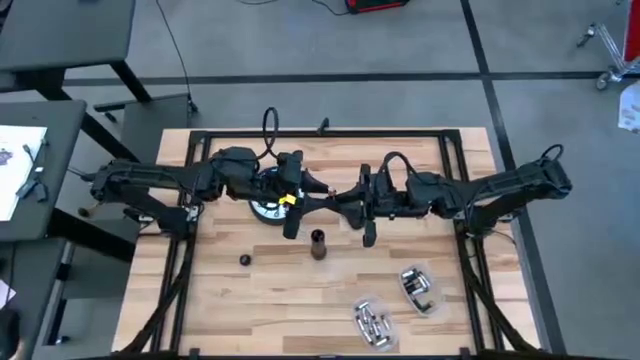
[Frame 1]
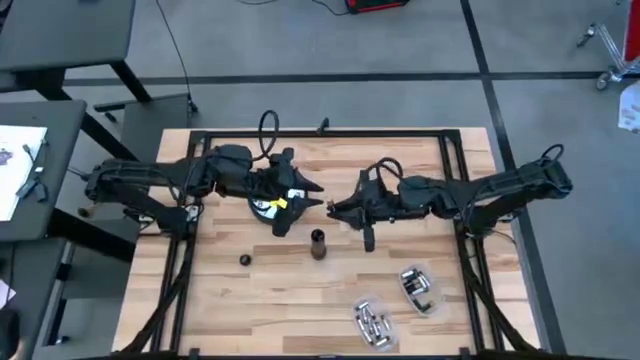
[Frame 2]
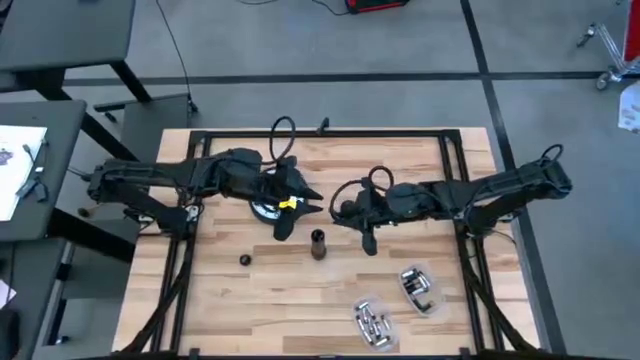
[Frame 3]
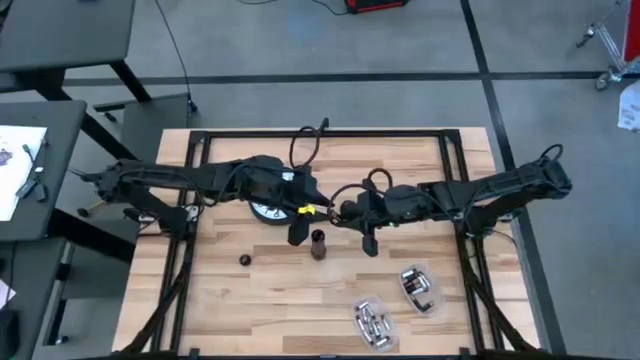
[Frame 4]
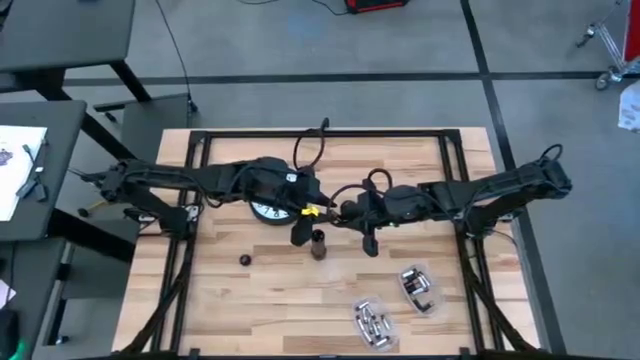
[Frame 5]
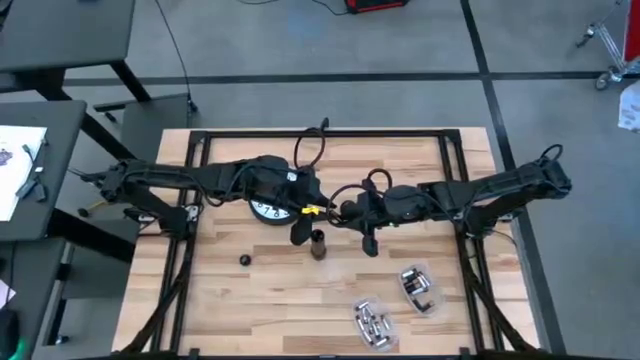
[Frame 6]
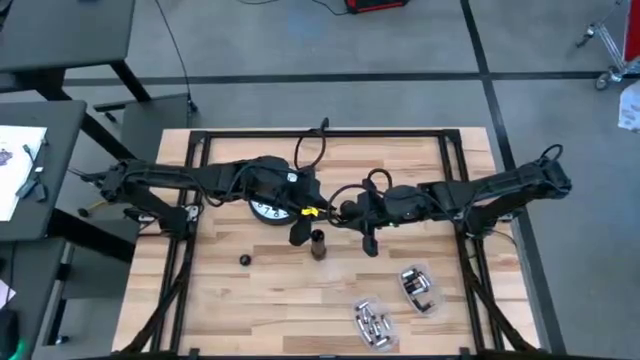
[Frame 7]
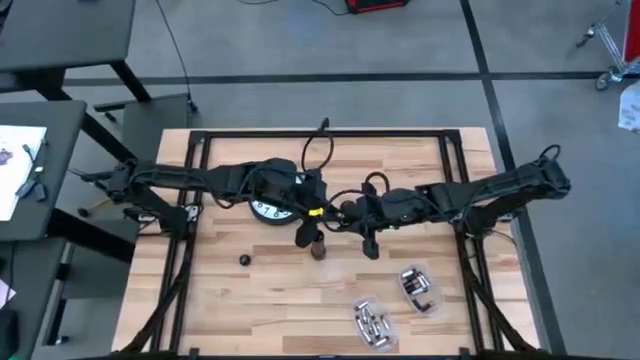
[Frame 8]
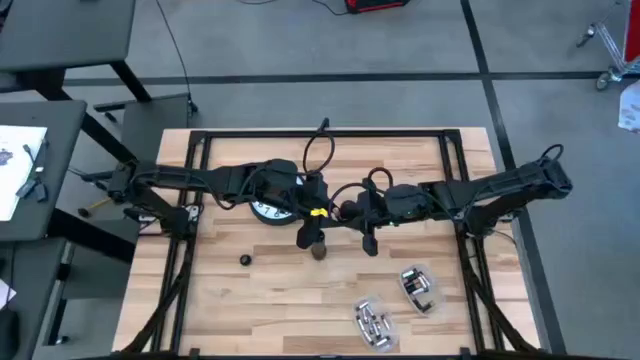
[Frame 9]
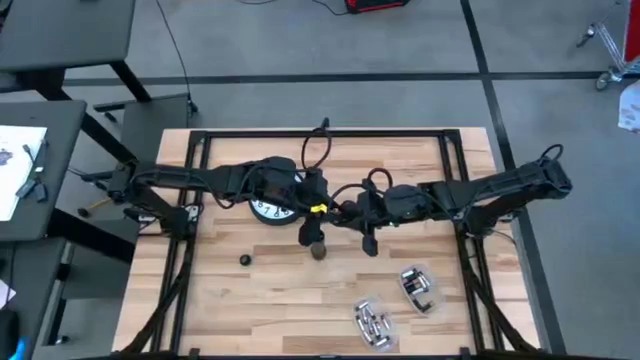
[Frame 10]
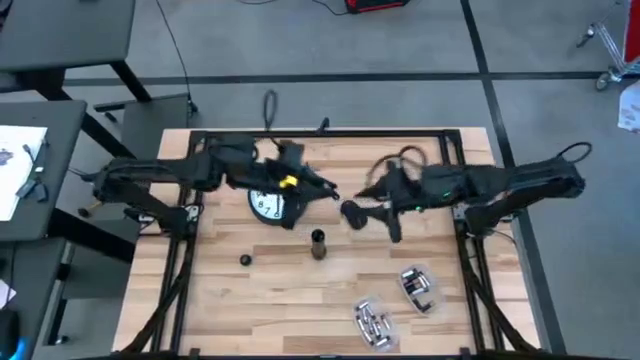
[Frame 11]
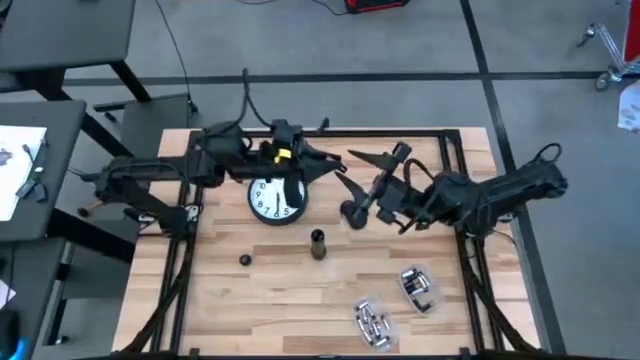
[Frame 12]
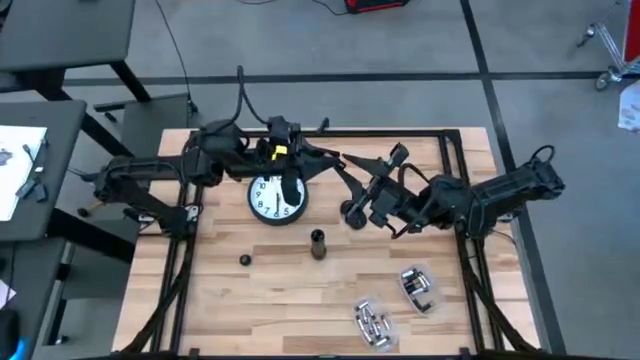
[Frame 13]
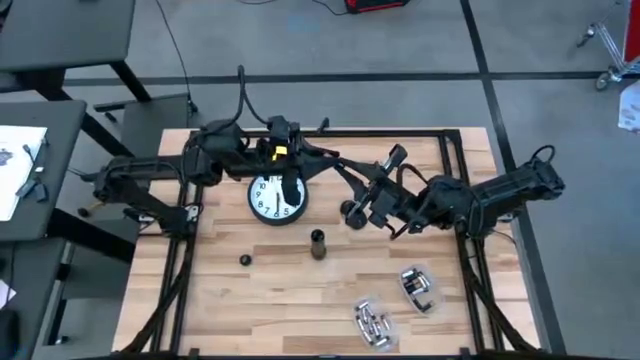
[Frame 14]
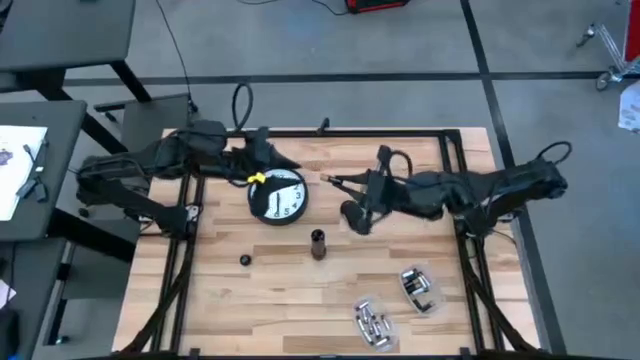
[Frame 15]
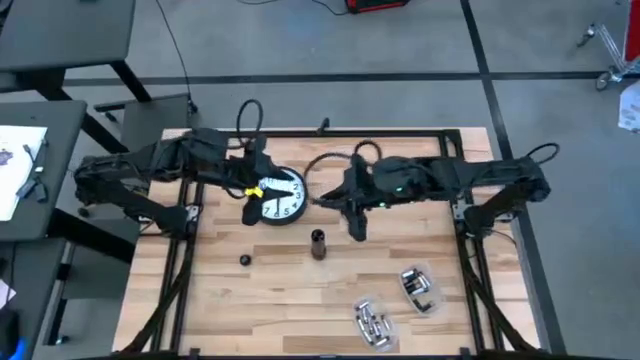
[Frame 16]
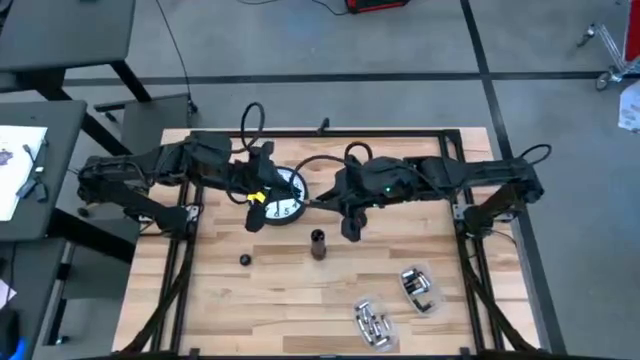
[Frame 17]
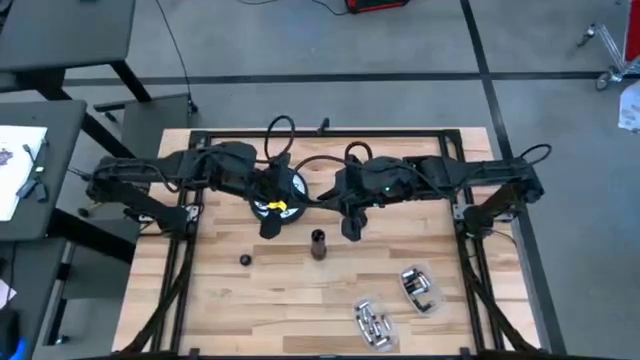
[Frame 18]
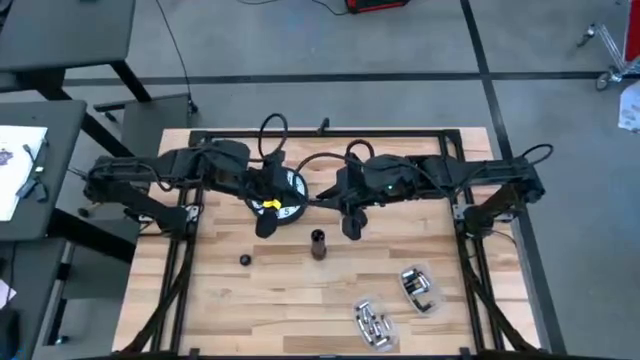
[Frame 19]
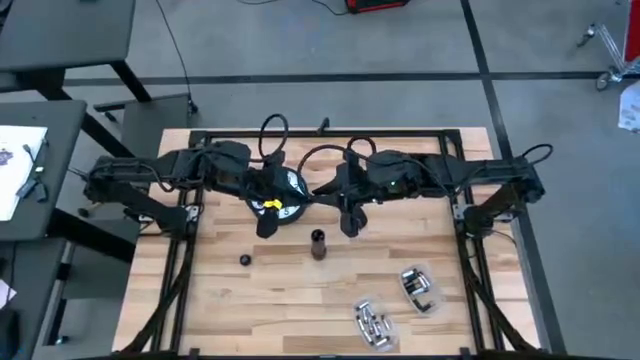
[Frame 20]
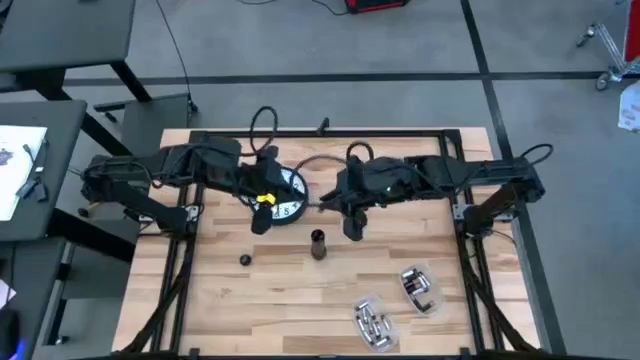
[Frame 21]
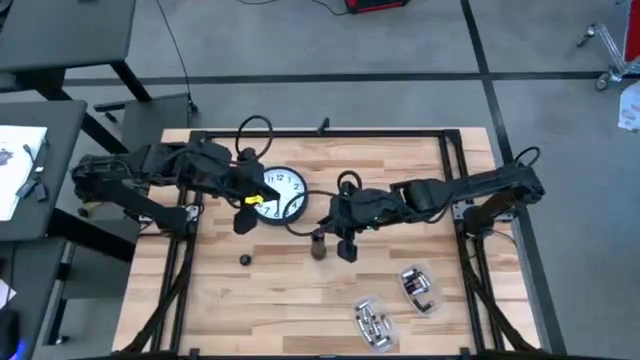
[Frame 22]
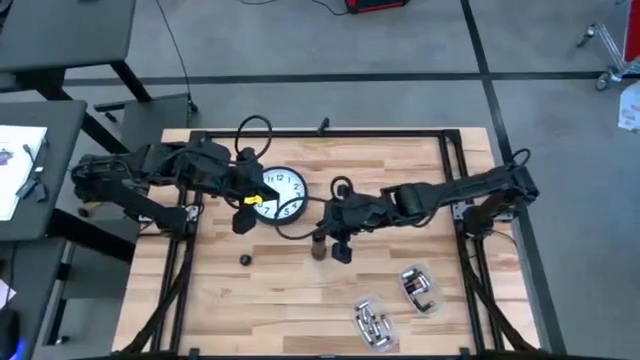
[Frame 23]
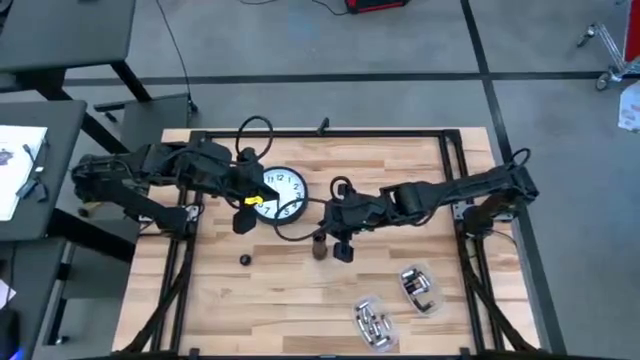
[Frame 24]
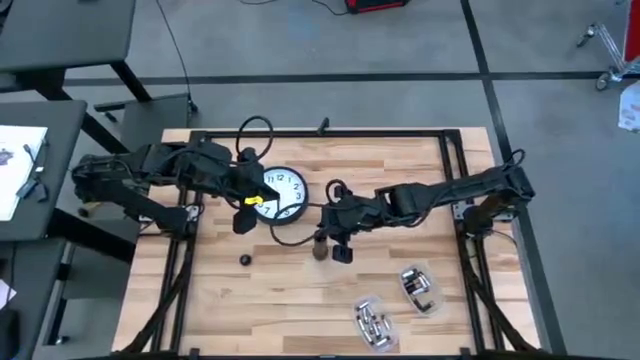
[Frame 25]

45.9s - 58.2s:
Task: Insert battery
Insert the brown battery into the black flashlight battery compartment

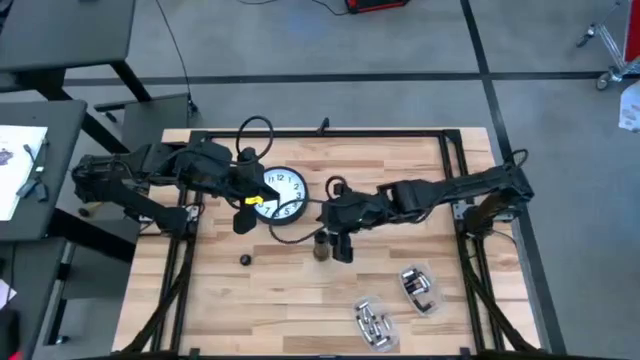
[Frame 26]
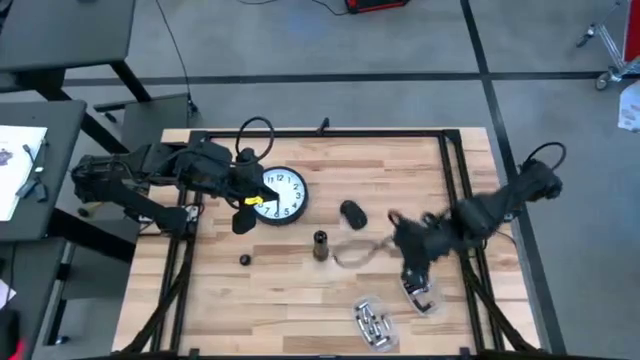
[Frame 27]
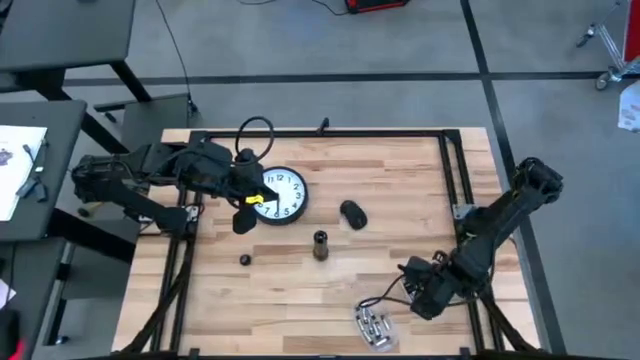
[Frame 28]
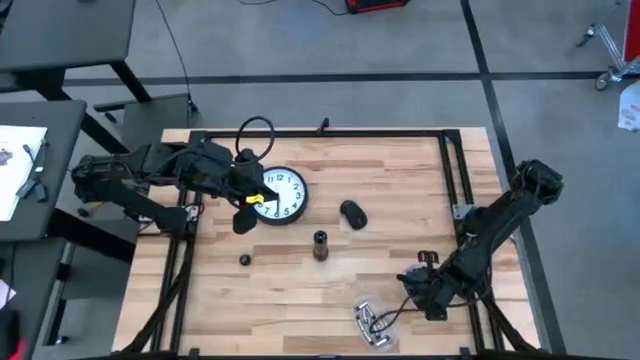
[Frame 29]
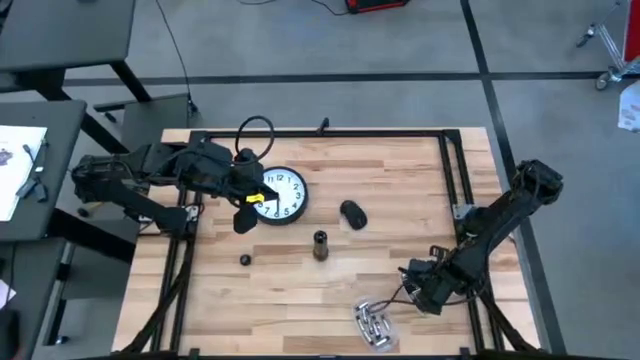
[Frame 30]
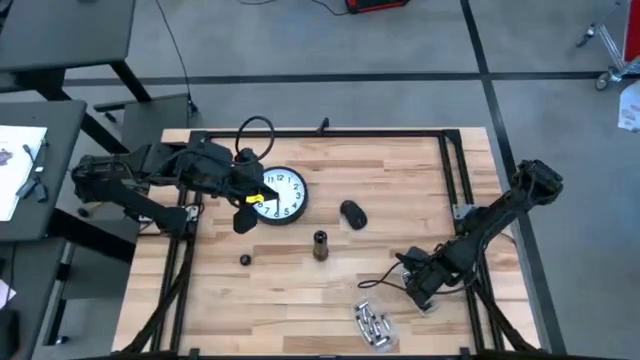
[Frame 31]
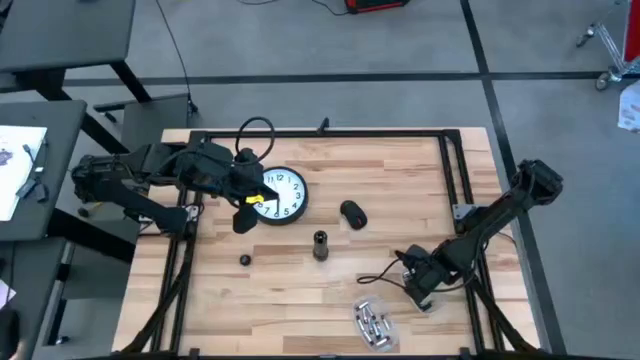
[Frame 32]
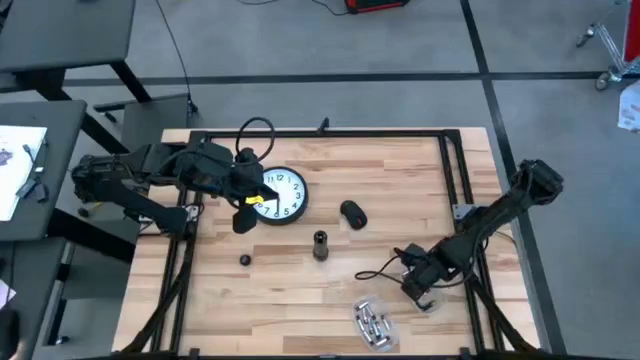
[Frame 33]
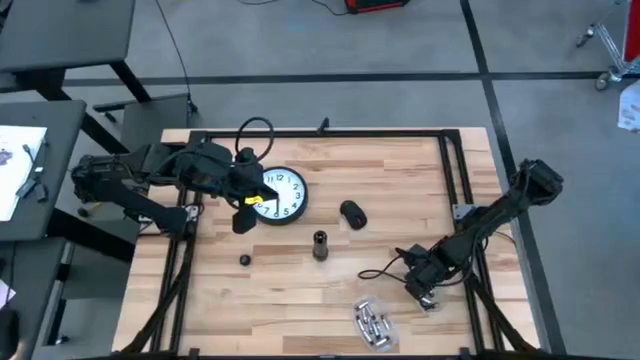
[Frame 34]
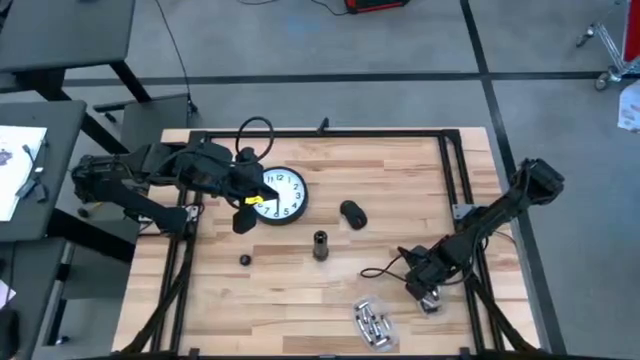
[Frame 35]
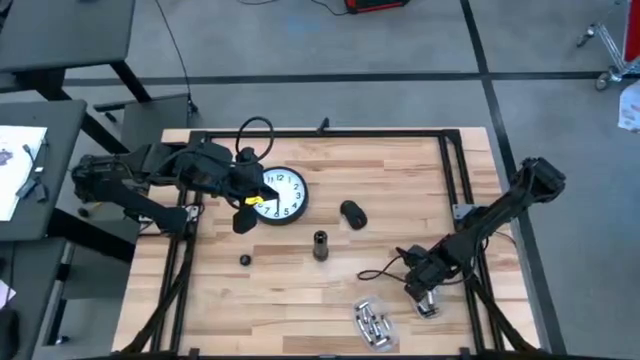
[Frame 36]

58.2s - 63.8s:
Insert the silver battery into the black flashlight battery compartment

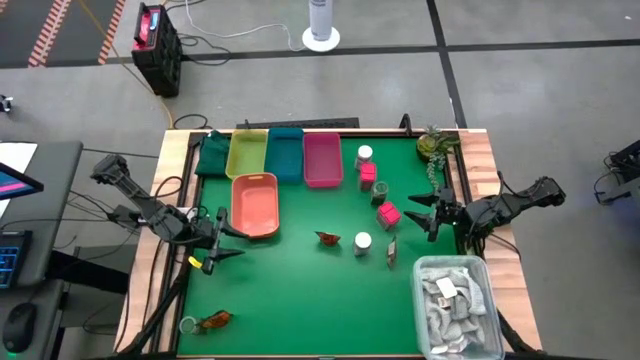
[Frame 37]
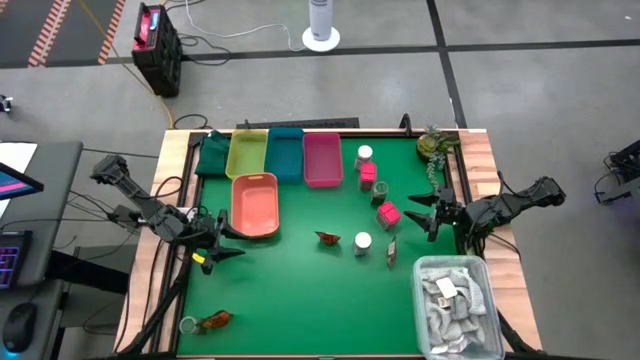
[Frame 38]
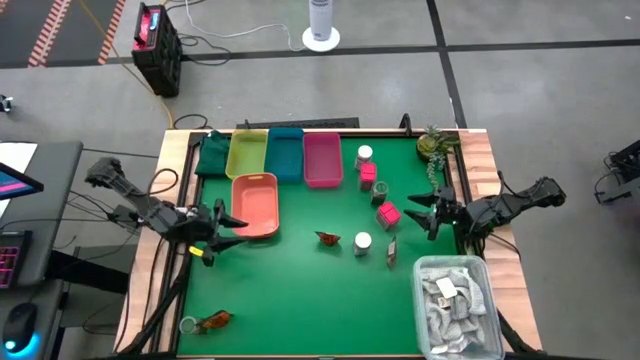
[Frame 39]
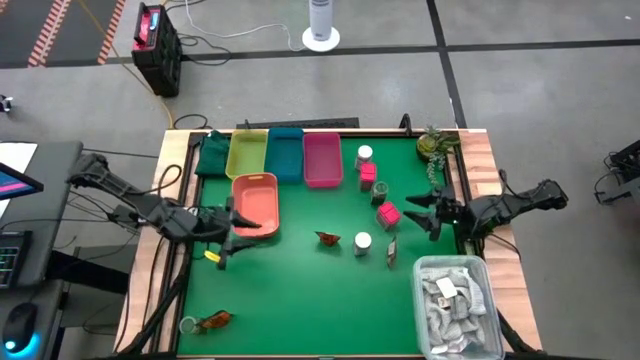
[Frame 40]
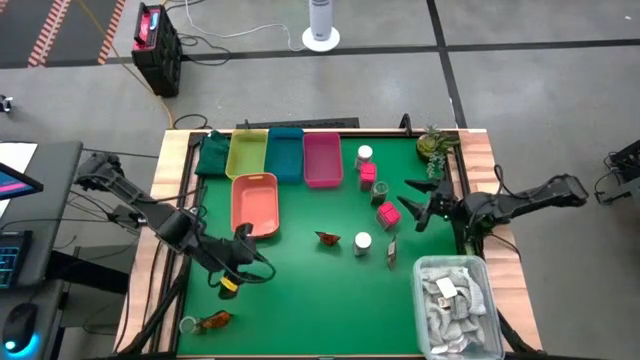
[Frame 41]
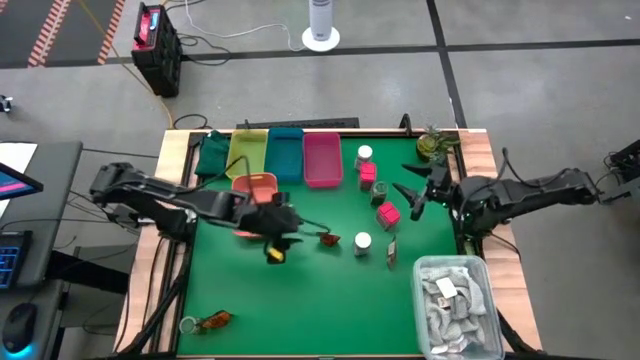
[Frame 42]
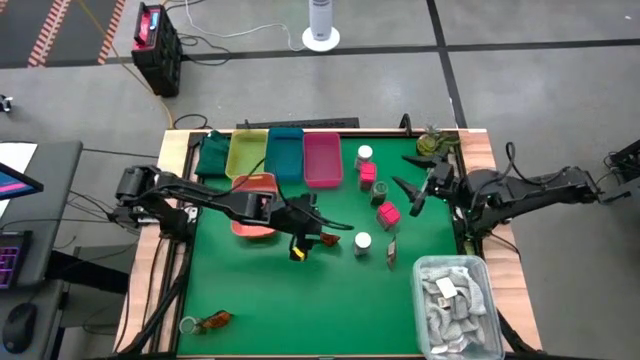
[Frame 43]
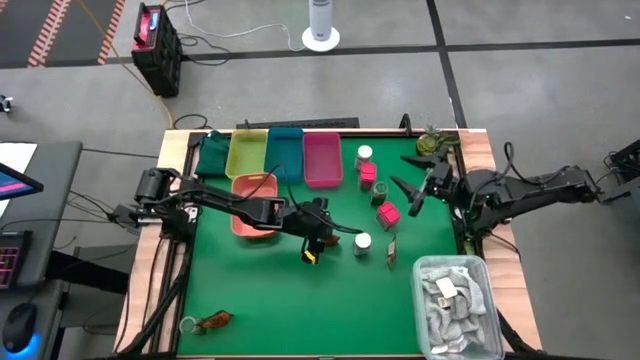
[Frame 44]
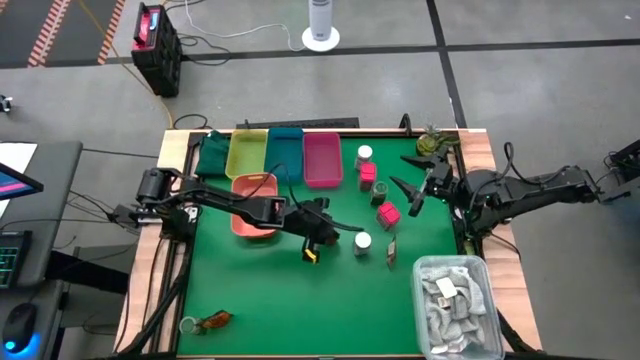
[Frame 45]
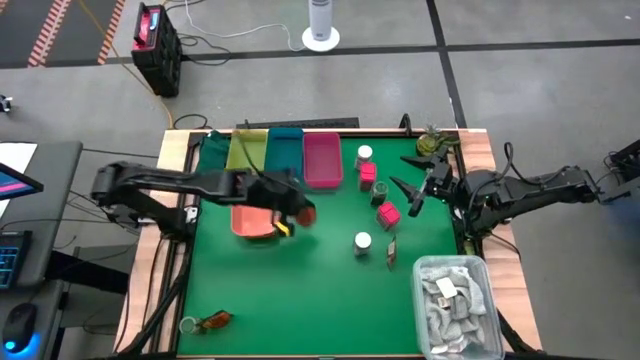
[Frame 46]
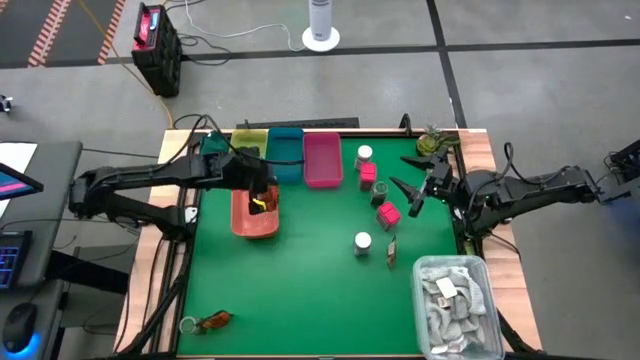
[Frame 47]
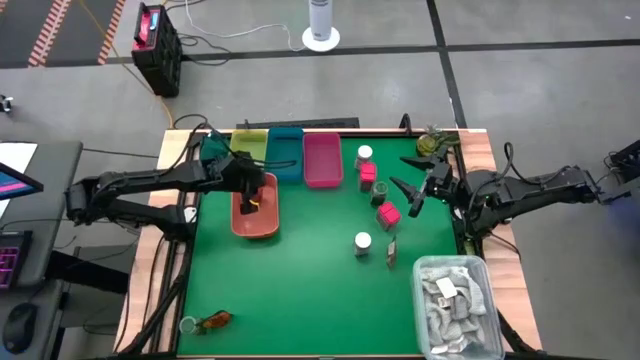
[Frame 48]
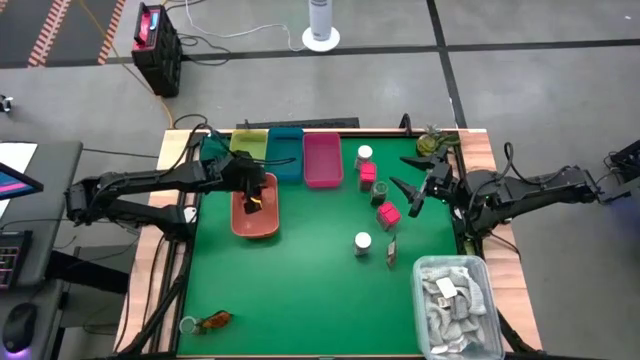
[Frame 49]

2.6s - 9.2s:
Task: Sort spices by type
Put the top orange seasoning pack into the orange bin
